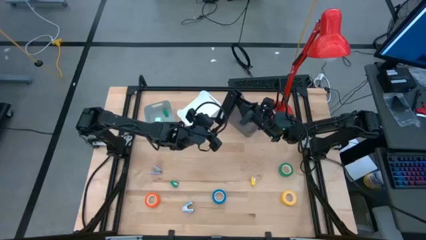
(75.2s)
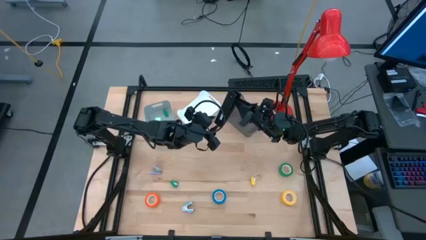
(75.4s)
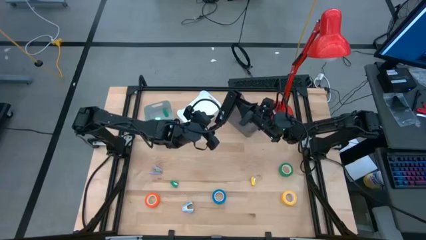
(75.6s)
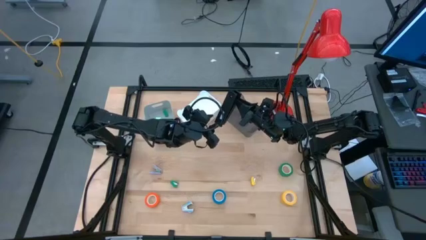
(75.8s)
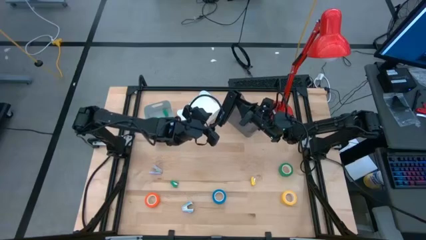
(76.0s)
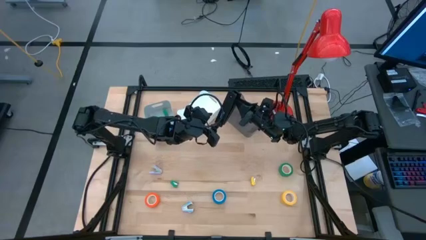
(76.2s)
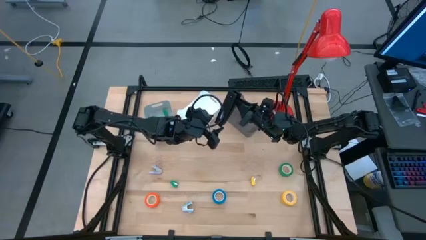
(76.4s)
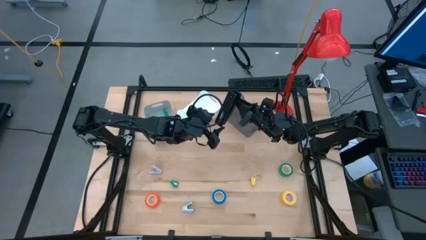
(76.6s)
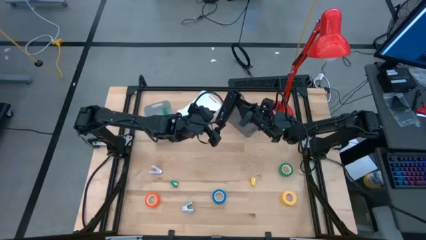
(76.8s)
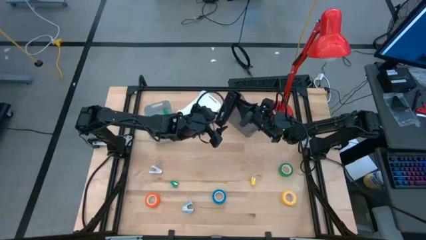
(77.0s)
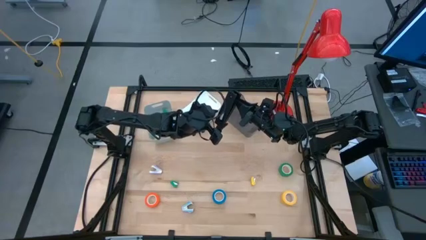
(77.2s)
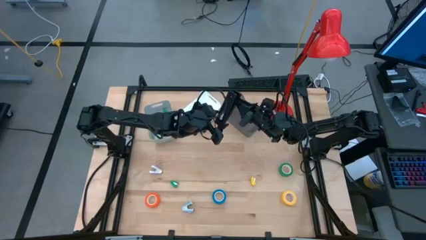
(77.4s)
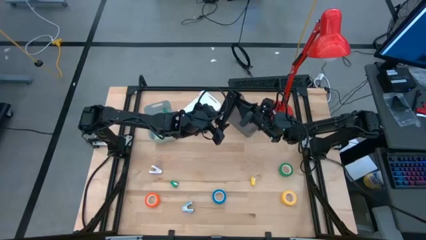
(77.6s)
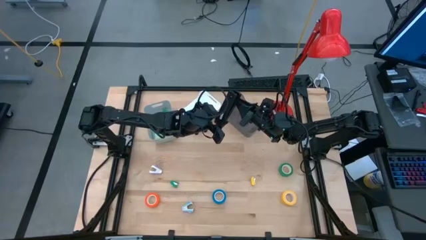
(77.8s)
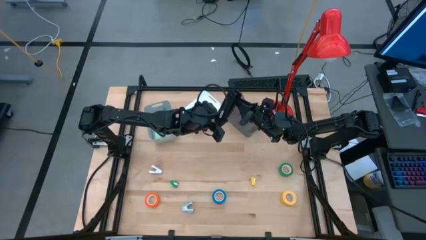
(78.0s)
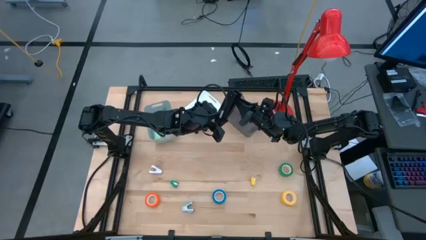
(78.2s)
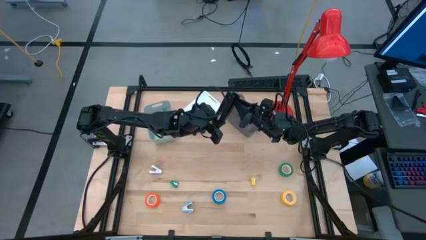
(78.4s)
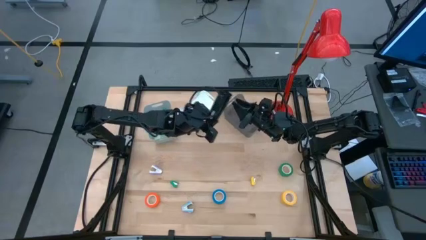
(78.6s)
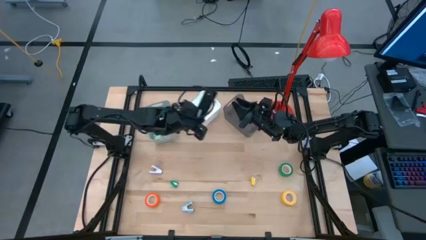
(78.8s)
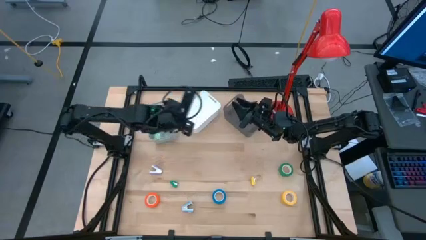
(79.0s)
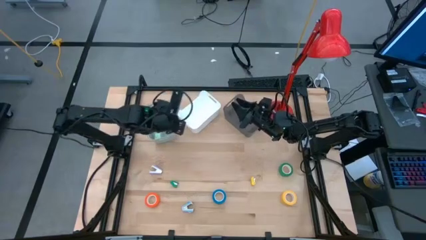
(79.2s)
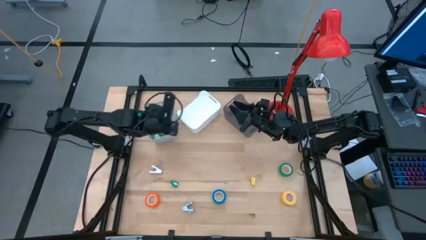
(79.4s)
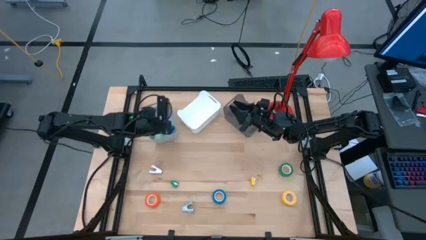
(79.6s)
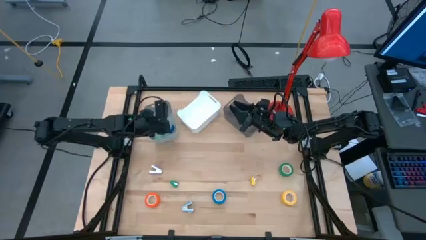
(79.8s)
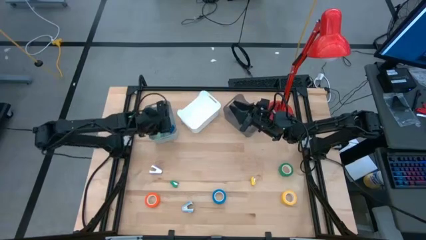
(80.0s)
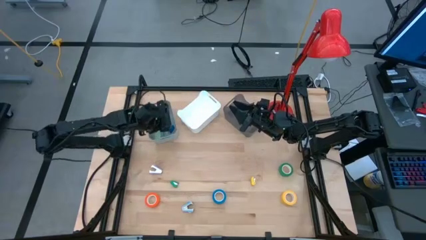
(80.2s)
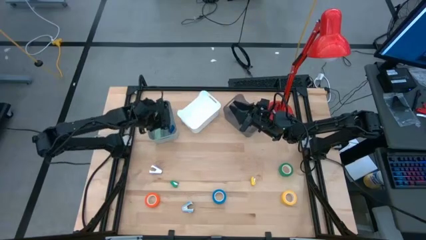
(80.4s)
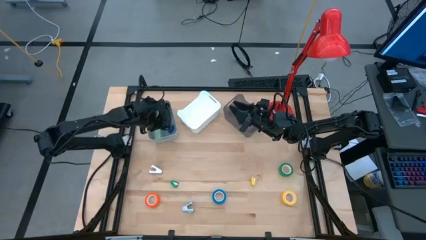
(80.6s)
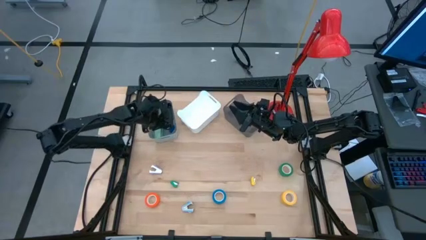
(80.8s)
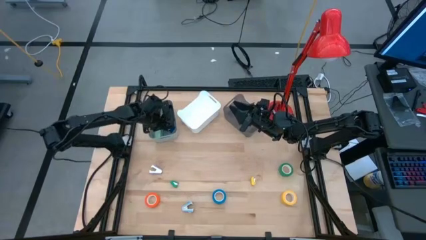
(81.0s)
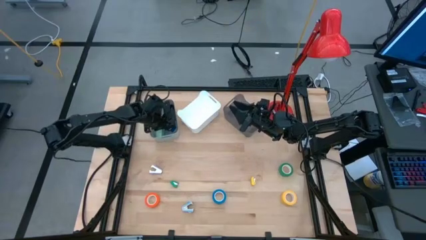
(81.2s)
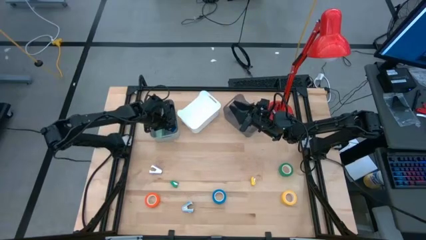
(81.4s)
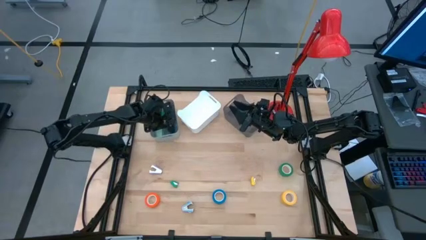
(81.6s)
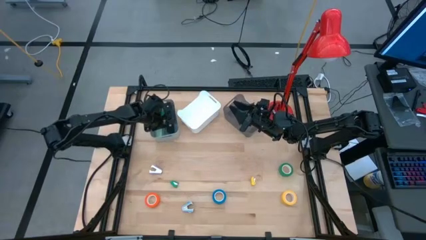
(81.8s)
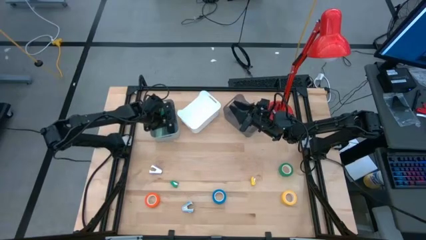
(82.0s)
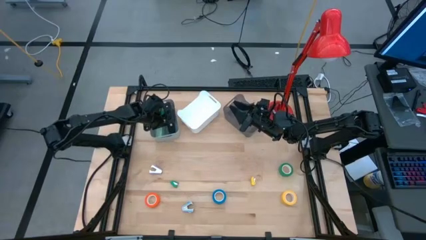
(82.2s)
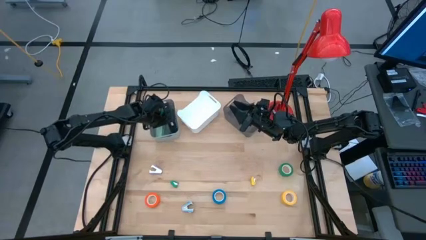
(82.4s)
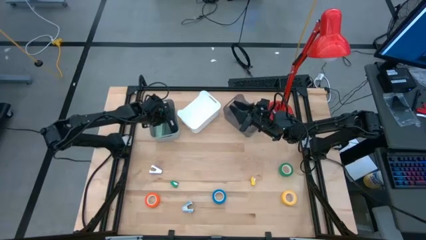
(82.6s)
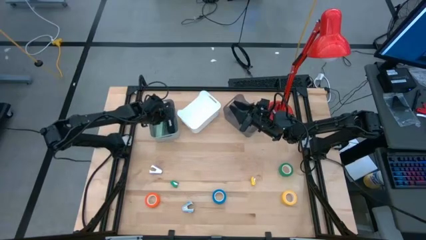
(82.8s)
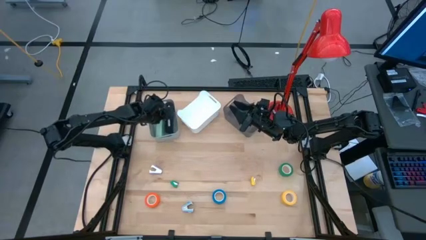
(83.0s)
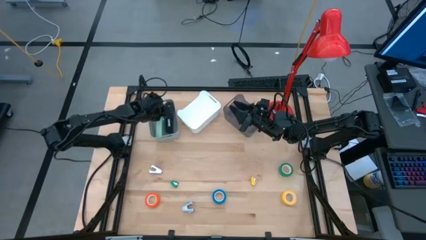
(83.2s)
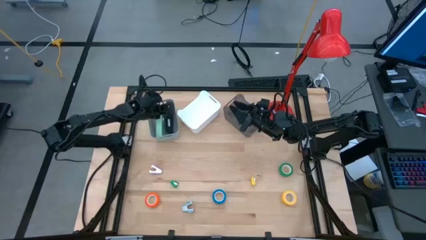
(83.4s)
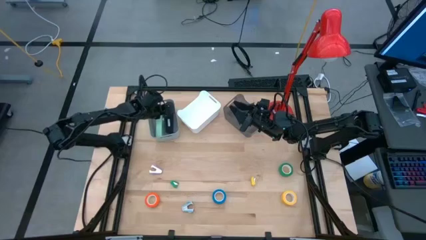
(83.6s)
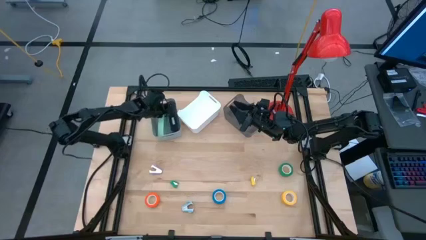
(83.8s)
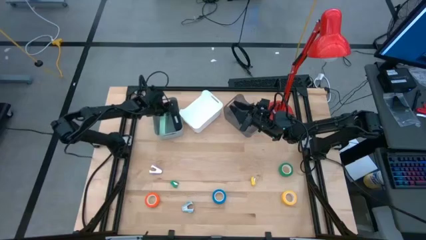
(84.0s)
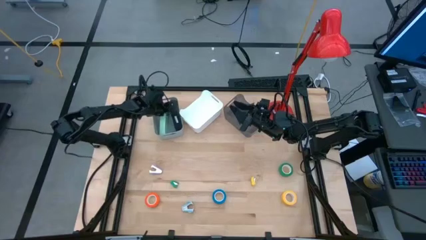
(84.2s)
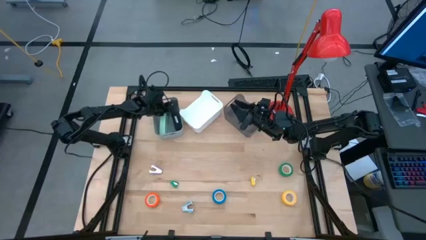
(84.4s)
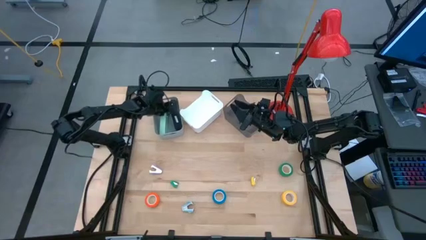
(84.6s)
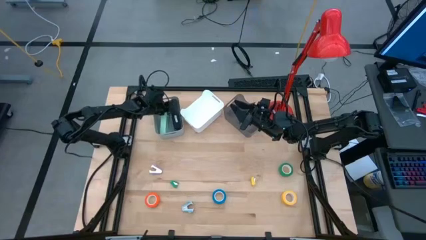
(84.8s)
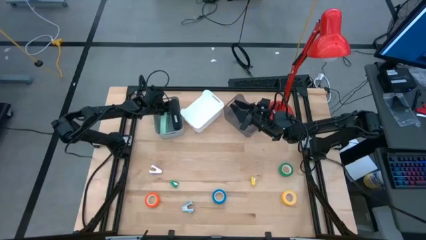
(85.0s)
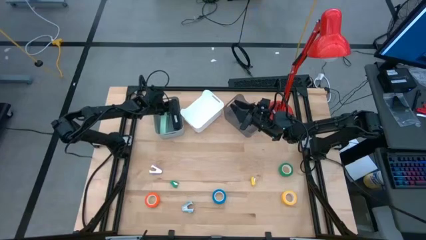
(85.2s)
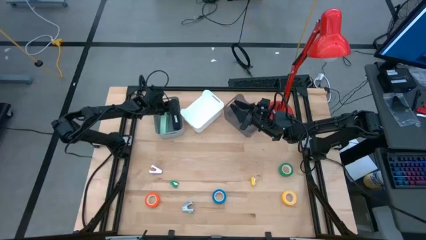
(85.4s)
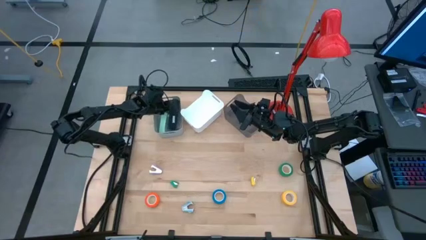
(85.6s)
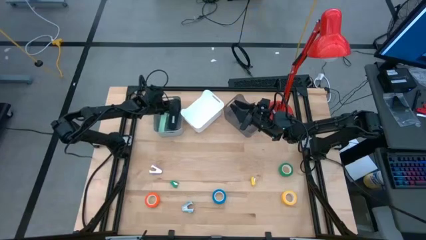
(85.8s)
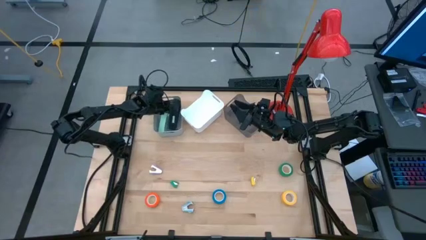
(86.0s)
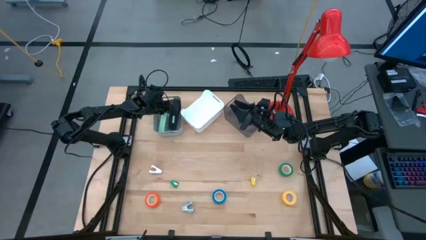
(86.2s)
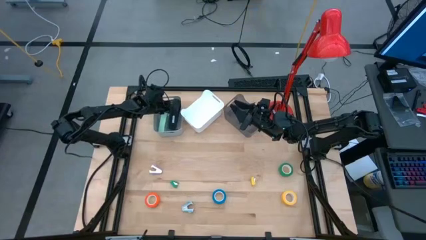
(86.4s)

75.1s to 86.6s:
Task: Pick and place Stapler, Stapler remover, tape
Put the large black stapler into the gray bin
